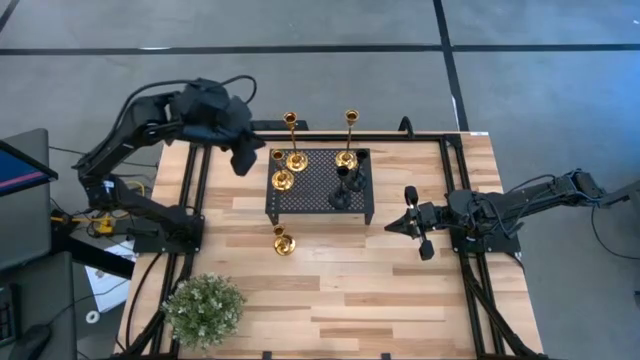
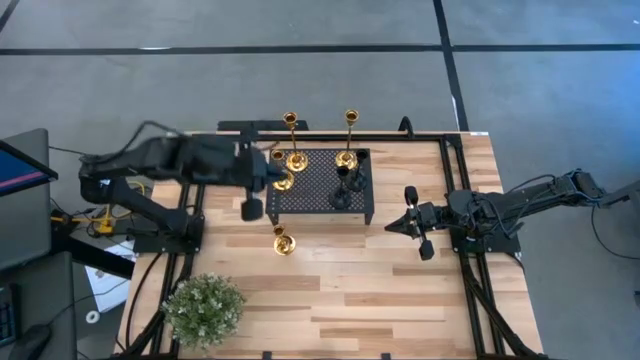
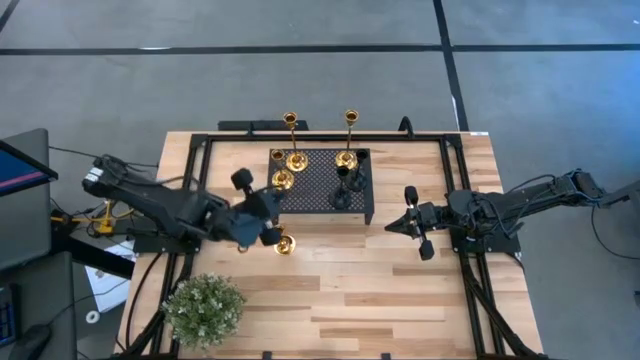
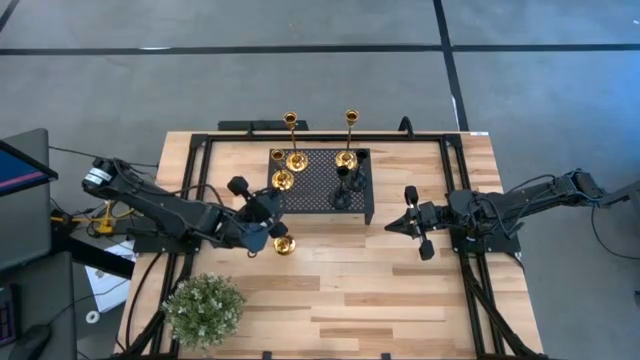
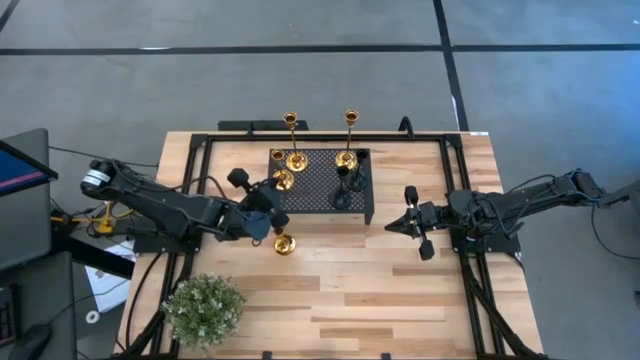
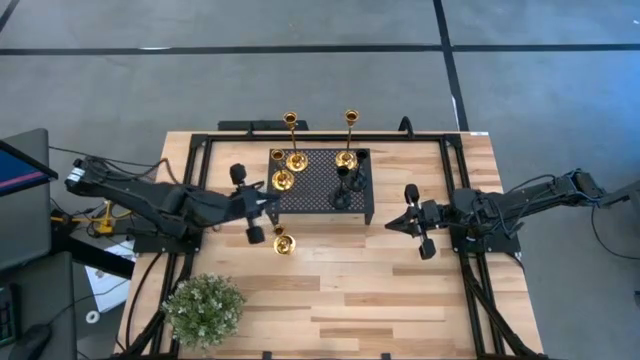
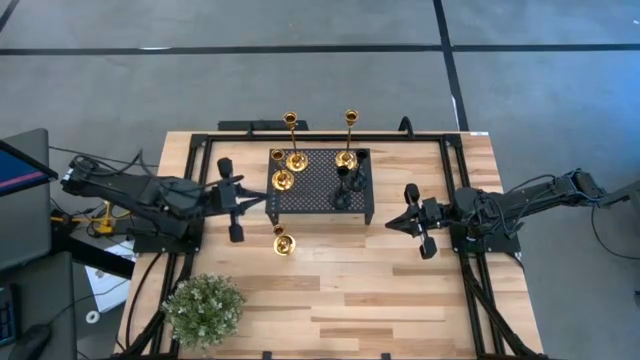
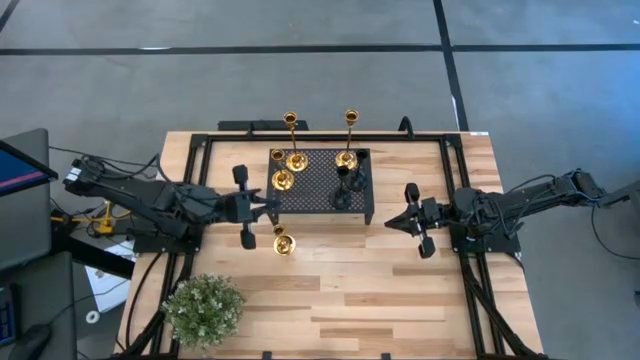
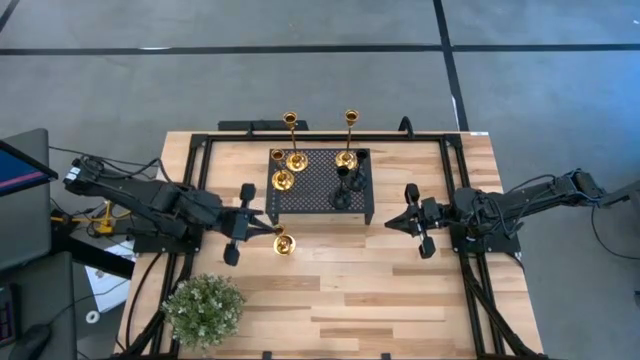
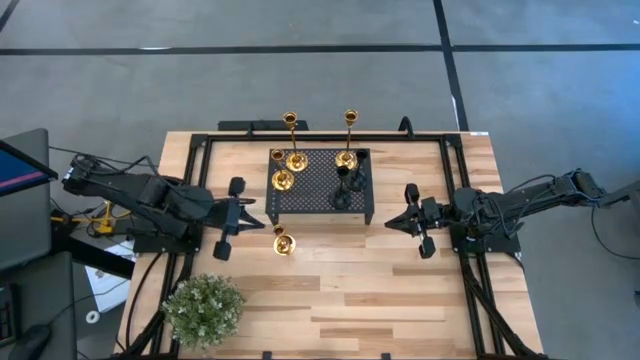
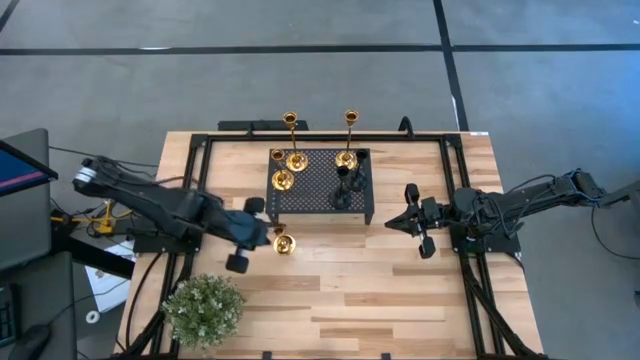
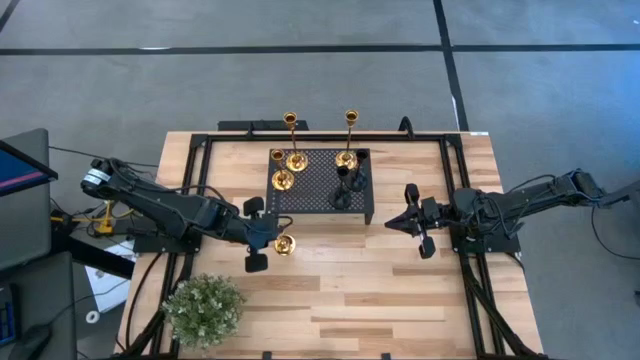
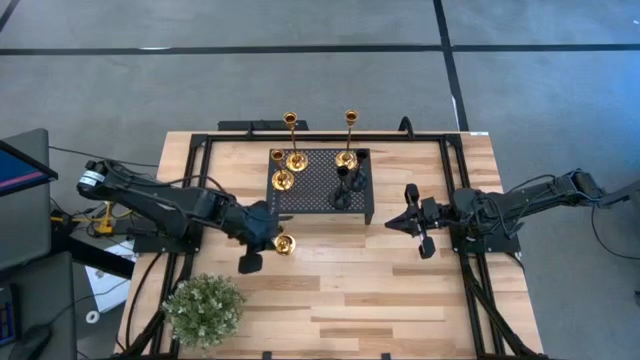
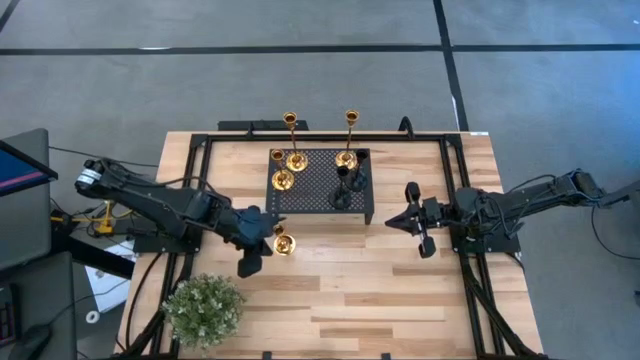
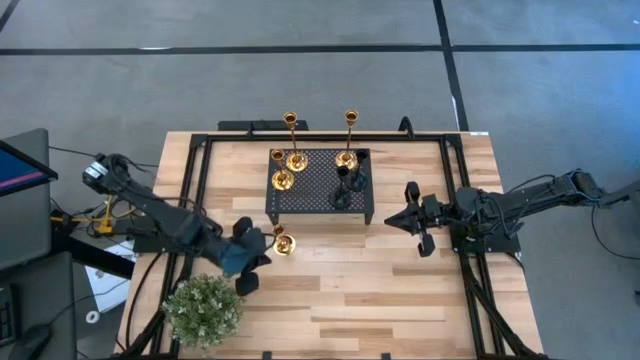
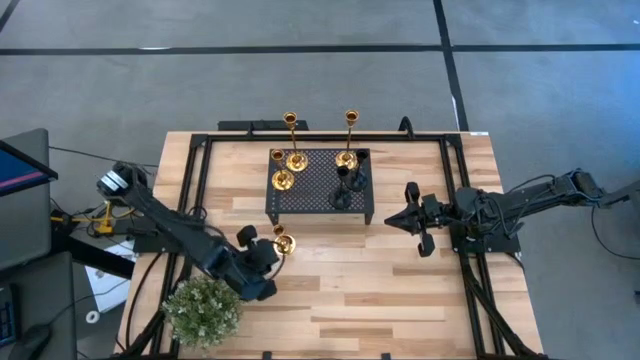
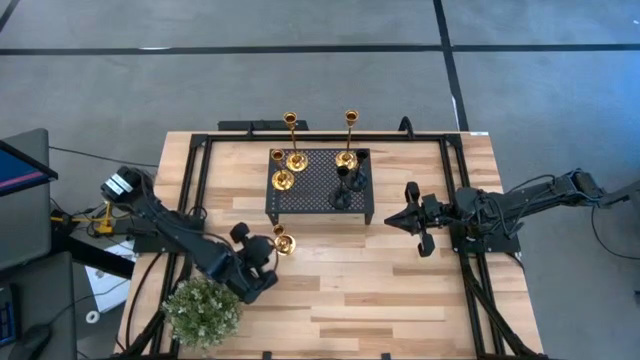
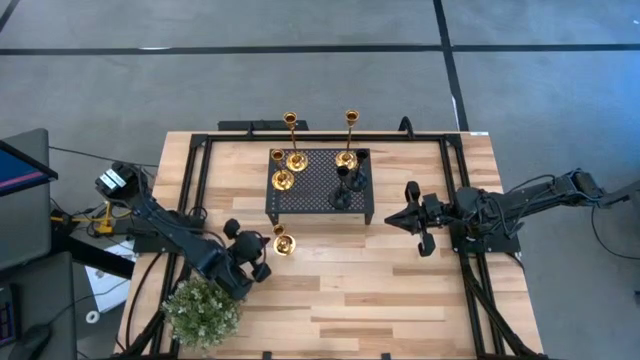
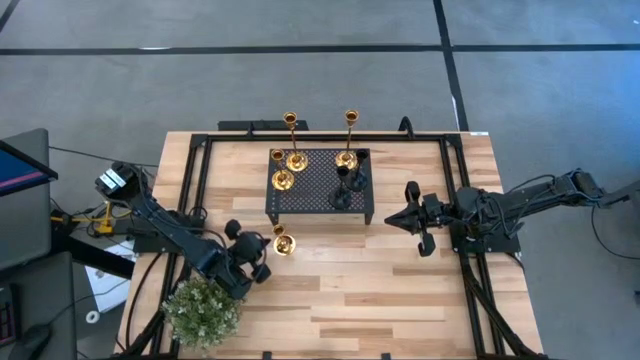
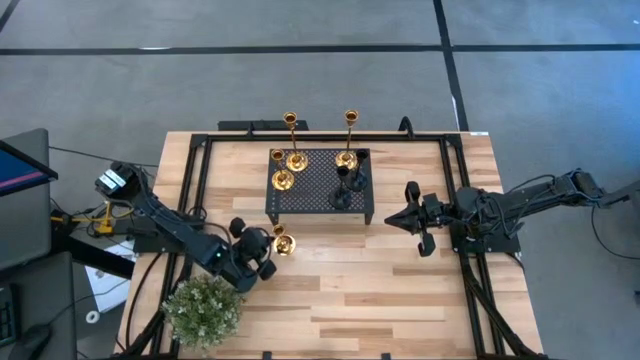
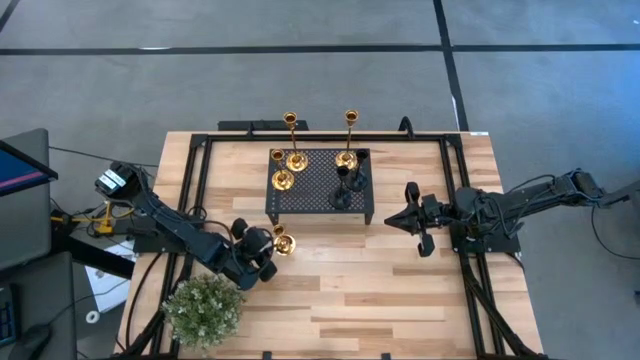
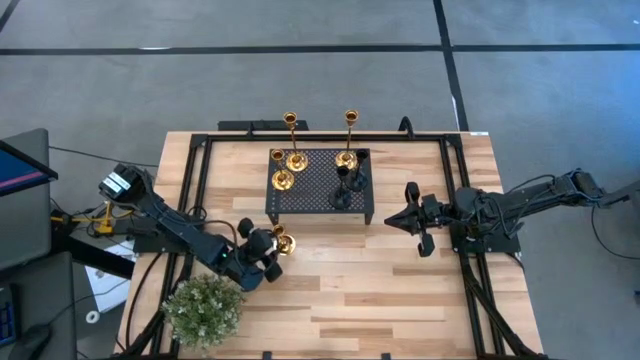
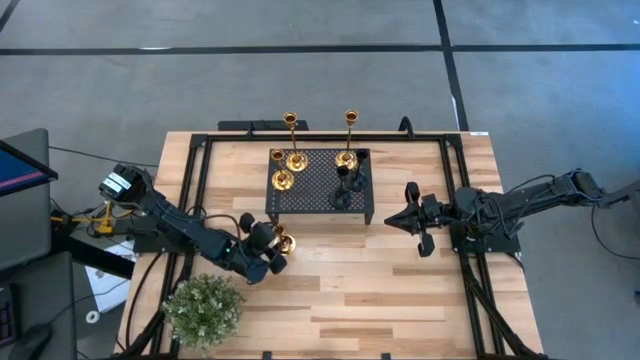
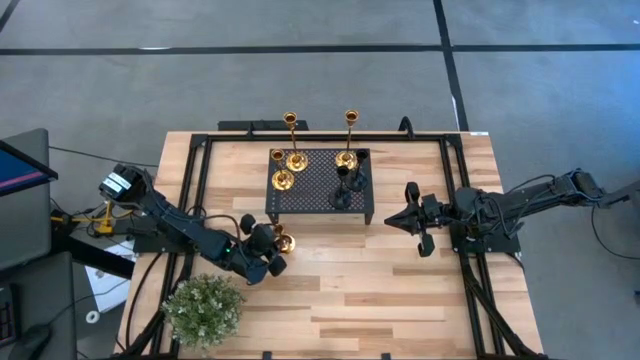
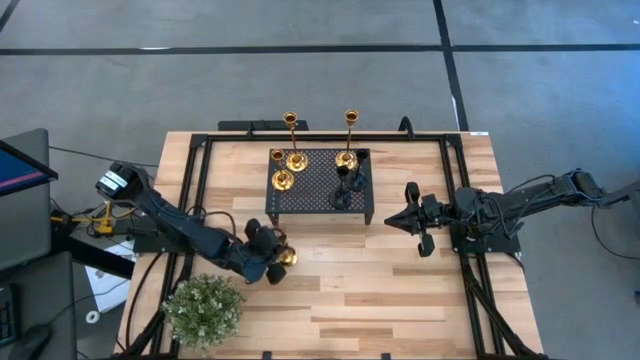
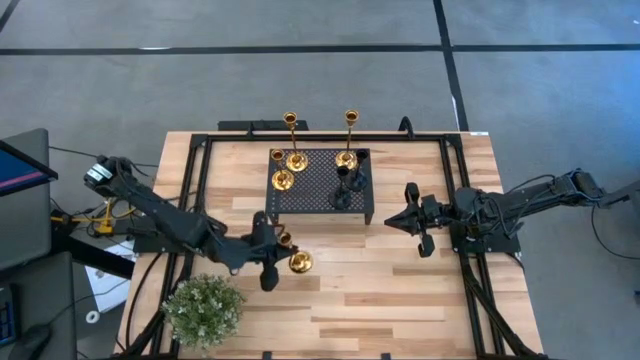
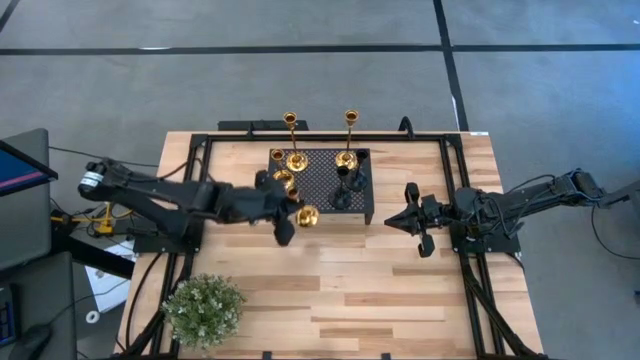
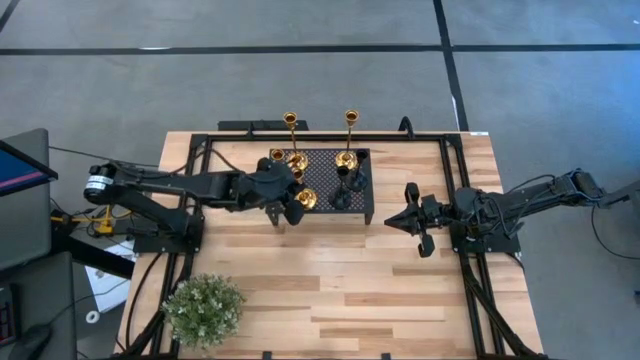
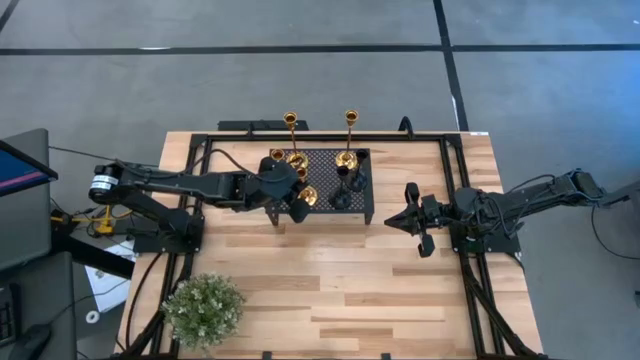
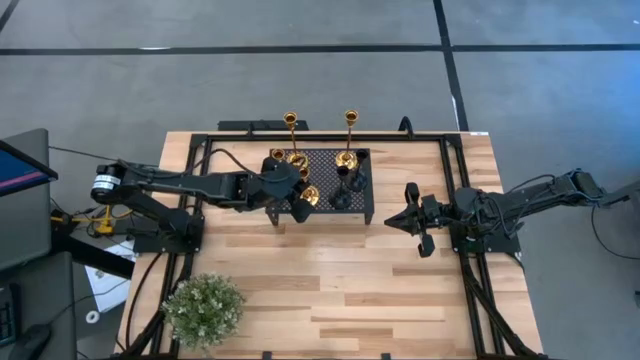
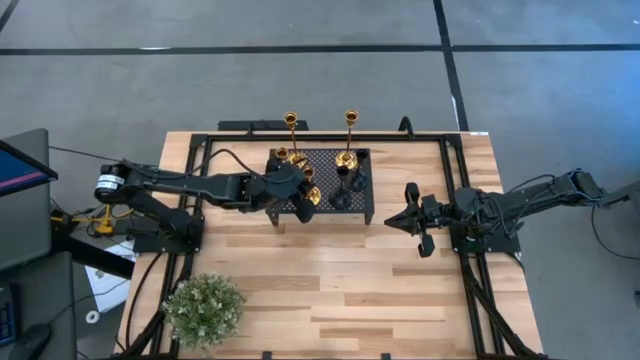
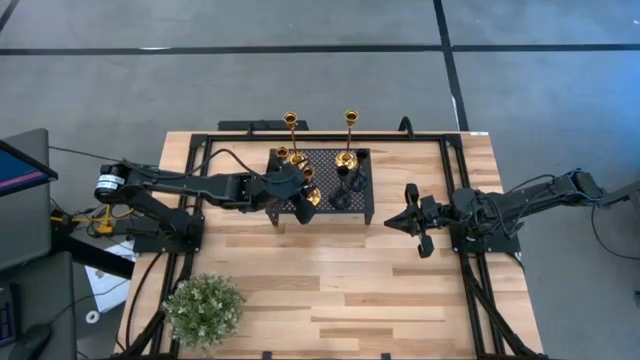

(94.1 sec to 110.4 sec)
Task: Pick & Place candle stick holders
Put the golden candle holder on the shelf

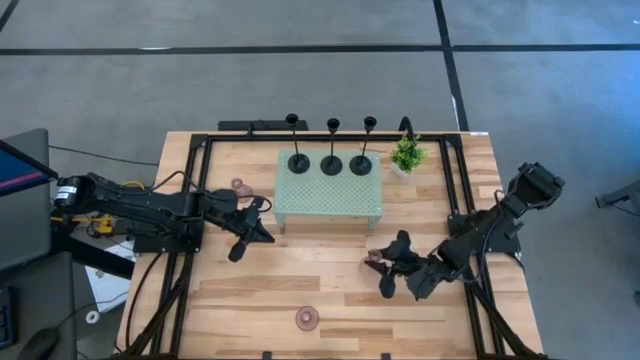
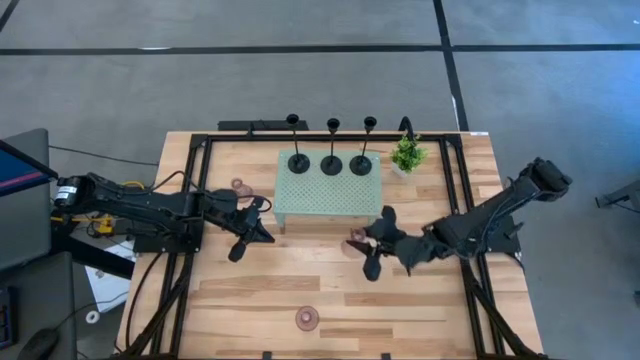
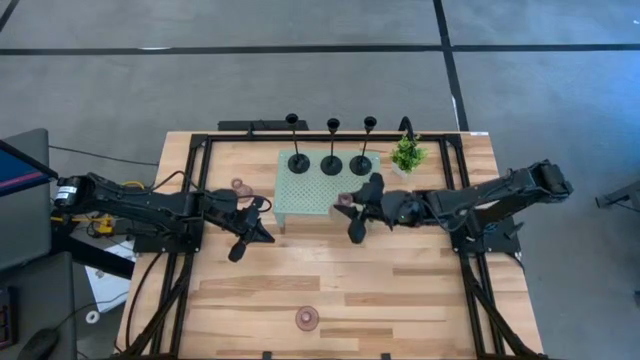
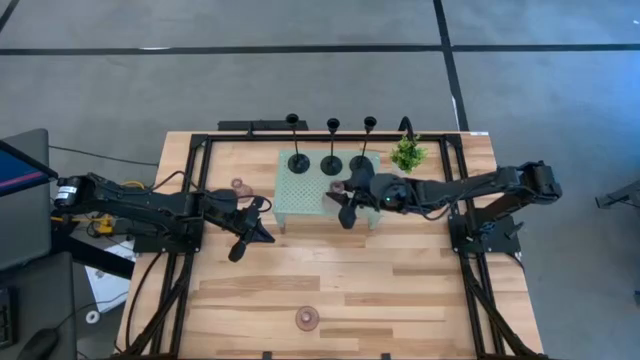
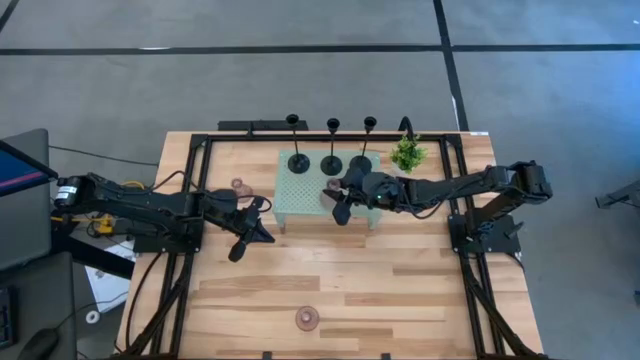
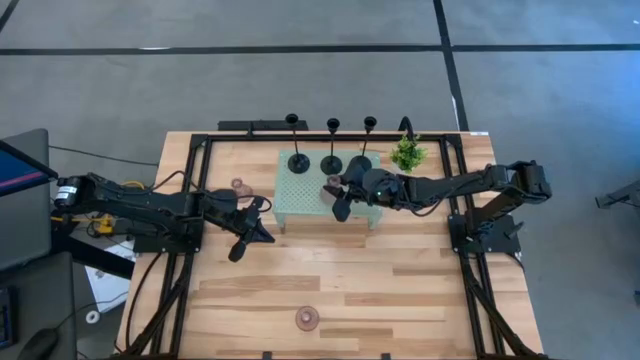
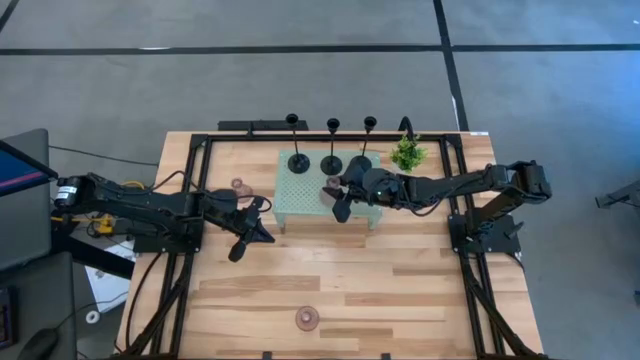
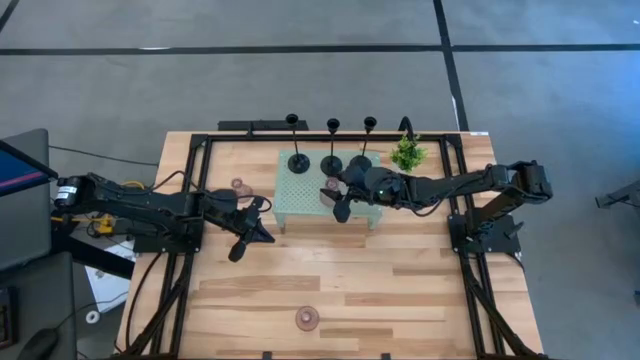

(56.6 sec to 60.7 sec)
Task: Pick & Place candle stick holders
Put the top right glass candle holder on the shelf aligned with the other black candle holder
